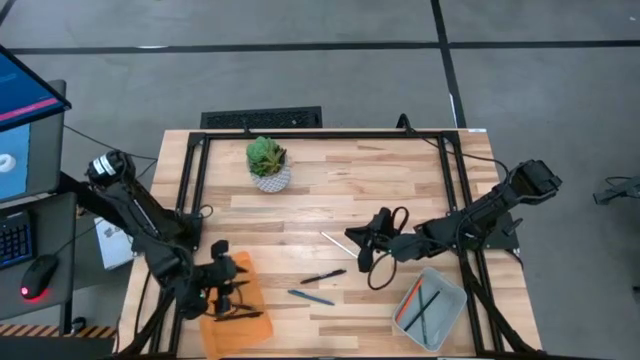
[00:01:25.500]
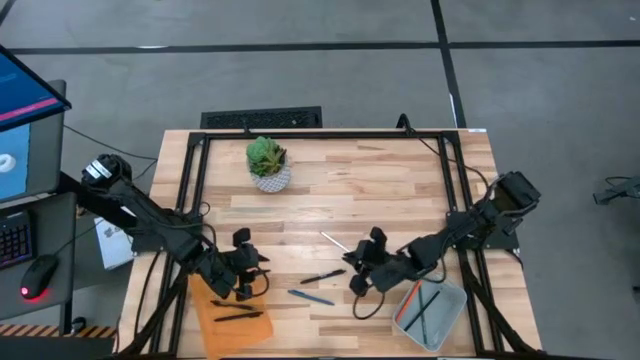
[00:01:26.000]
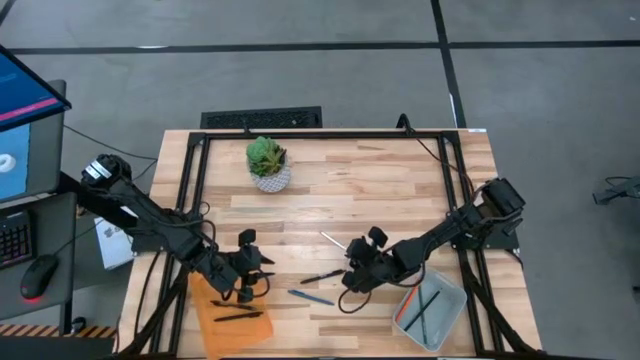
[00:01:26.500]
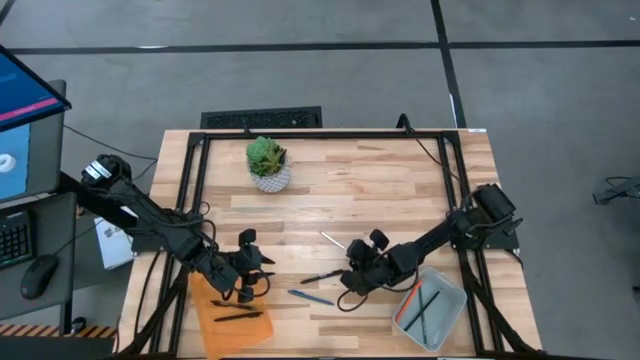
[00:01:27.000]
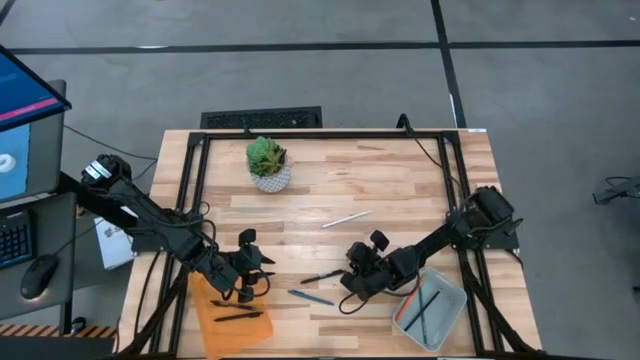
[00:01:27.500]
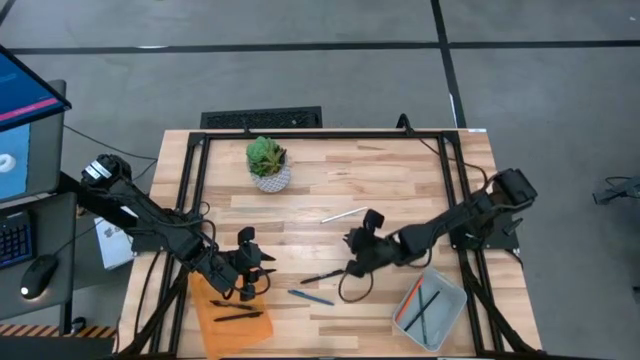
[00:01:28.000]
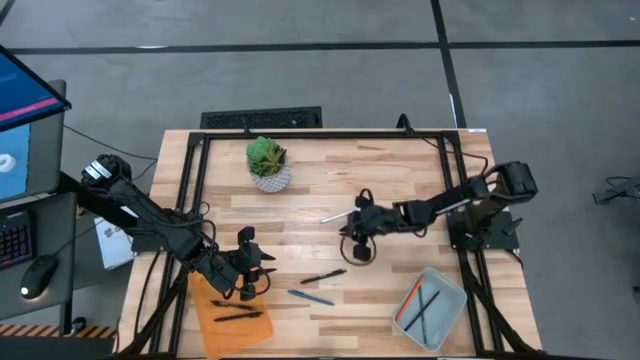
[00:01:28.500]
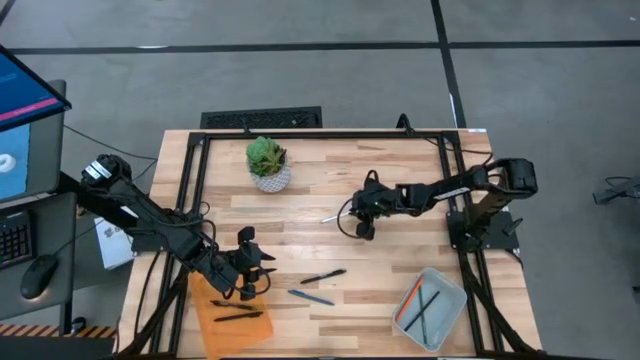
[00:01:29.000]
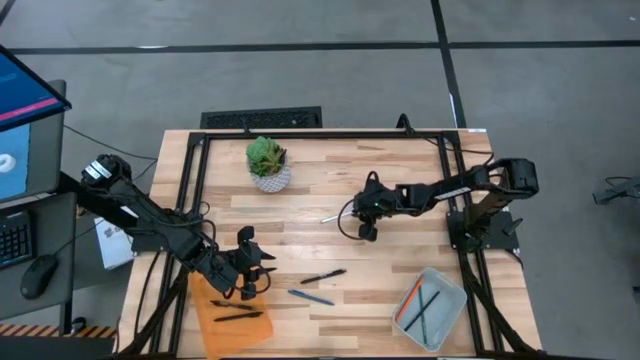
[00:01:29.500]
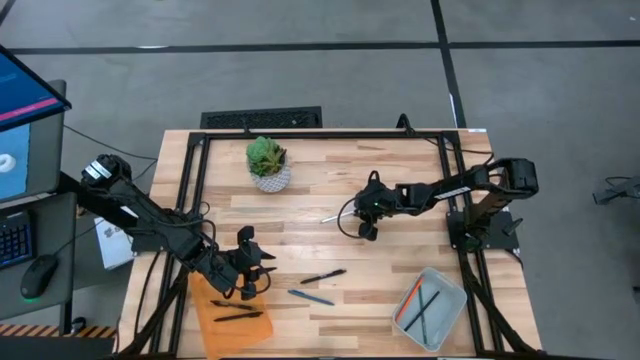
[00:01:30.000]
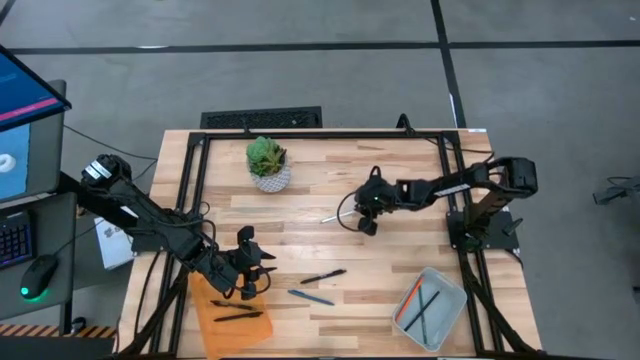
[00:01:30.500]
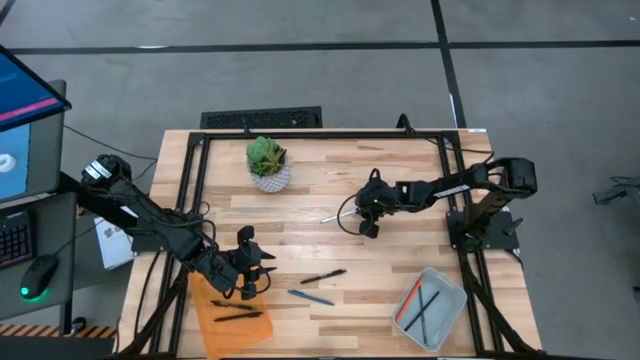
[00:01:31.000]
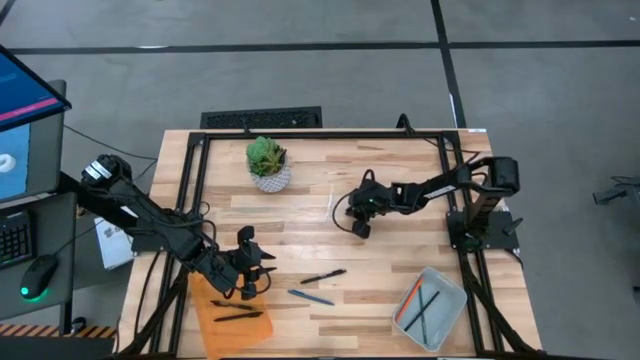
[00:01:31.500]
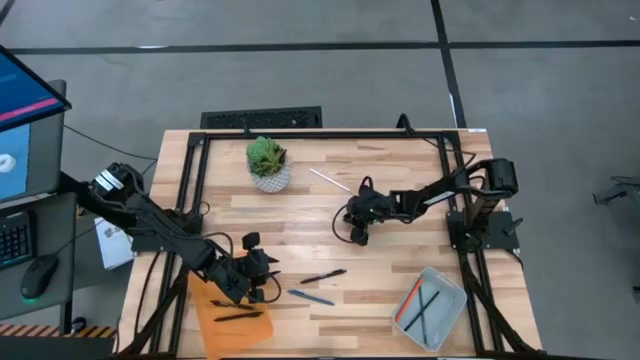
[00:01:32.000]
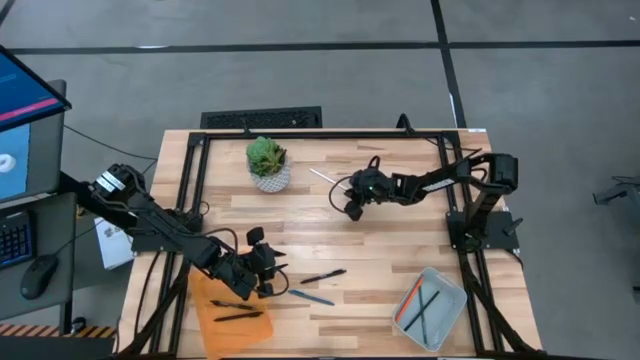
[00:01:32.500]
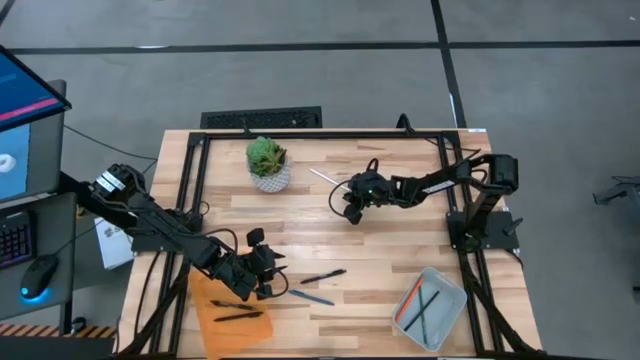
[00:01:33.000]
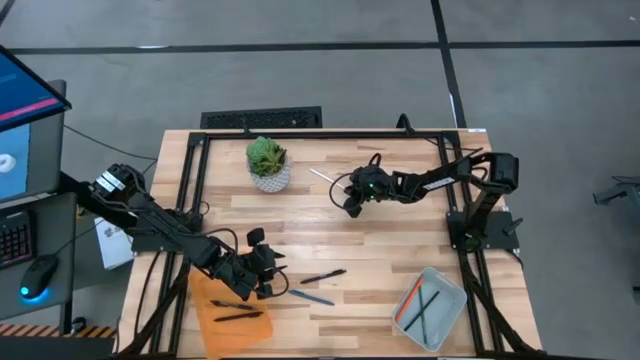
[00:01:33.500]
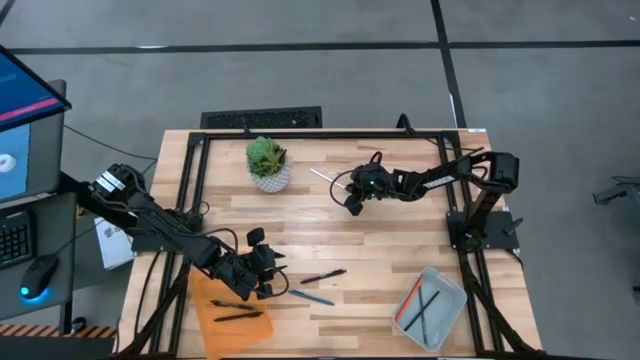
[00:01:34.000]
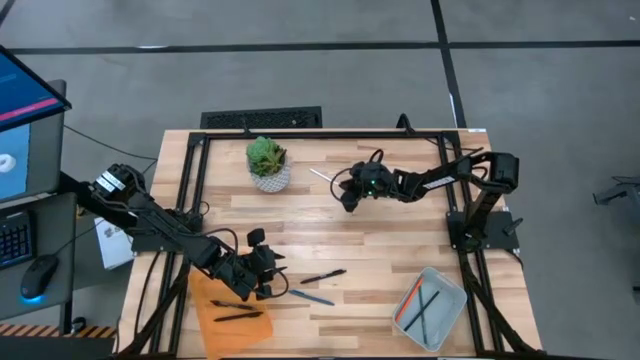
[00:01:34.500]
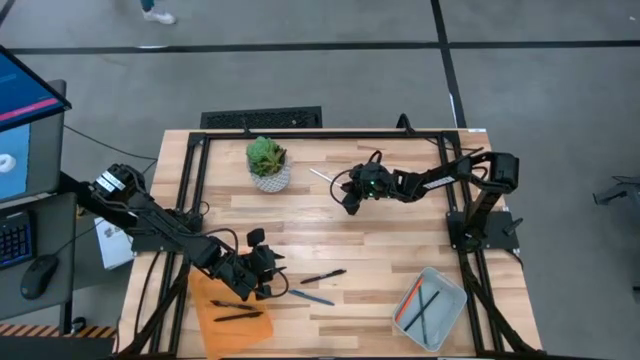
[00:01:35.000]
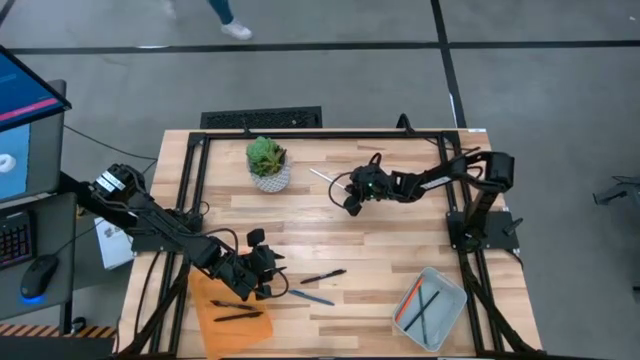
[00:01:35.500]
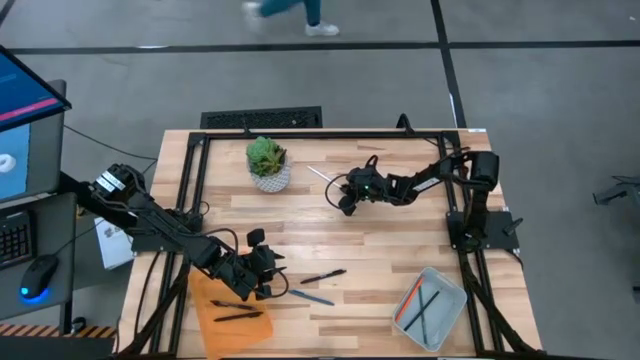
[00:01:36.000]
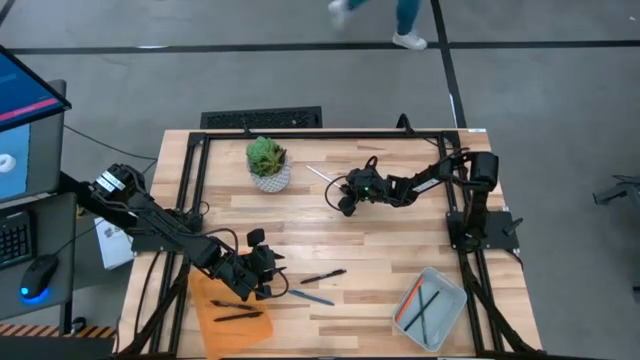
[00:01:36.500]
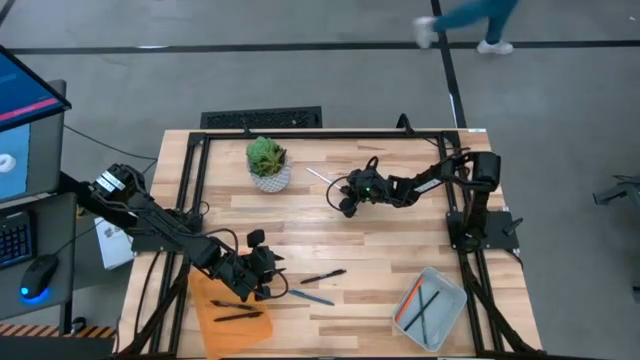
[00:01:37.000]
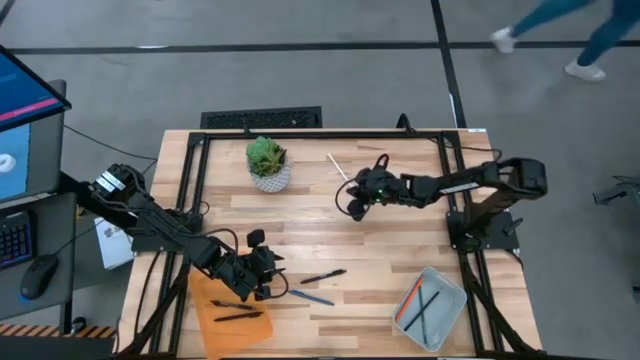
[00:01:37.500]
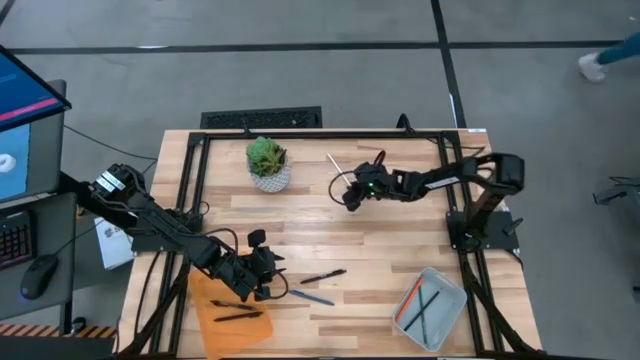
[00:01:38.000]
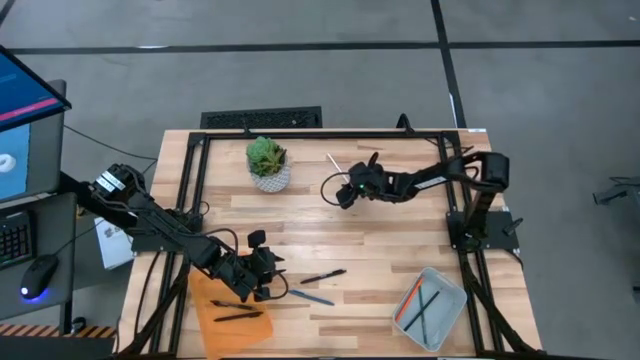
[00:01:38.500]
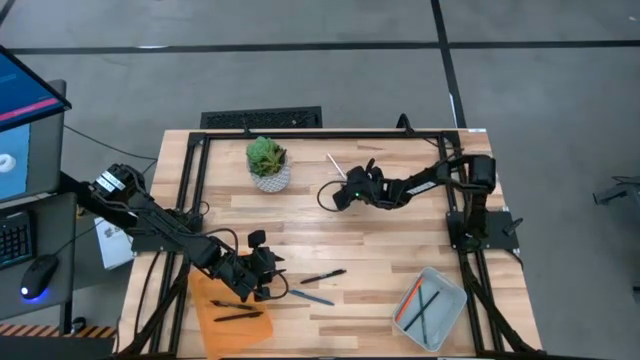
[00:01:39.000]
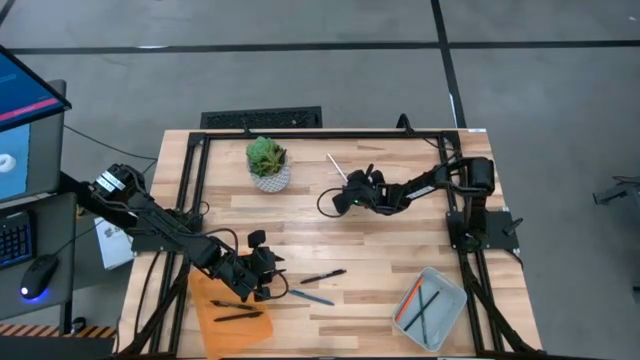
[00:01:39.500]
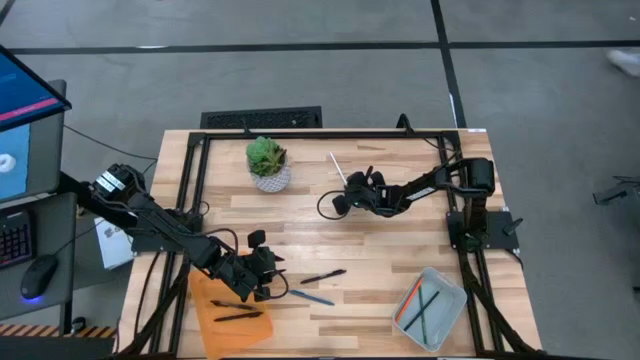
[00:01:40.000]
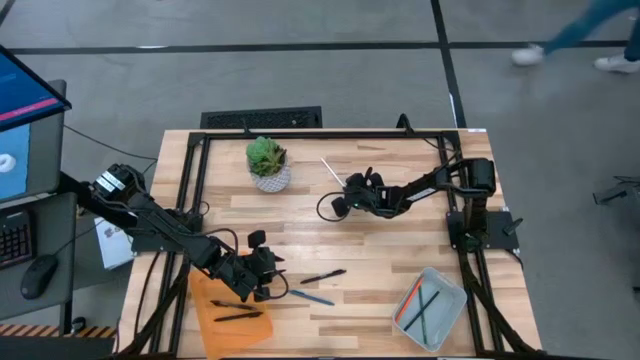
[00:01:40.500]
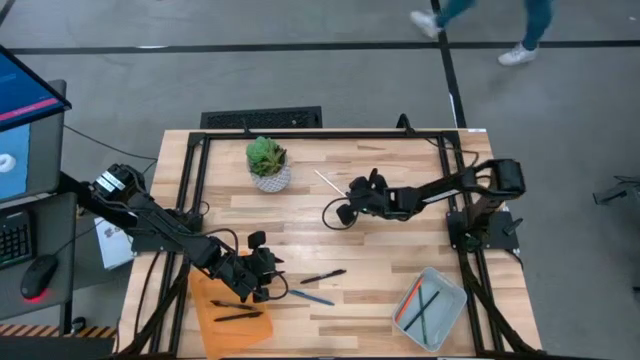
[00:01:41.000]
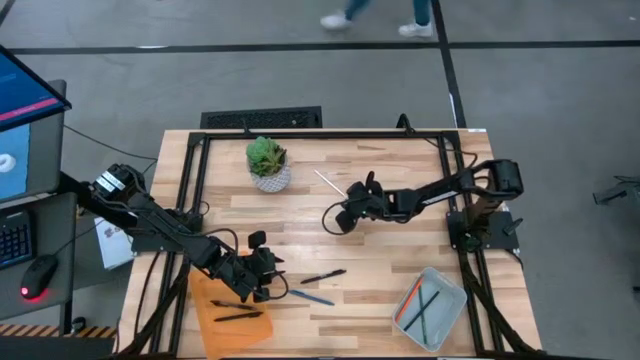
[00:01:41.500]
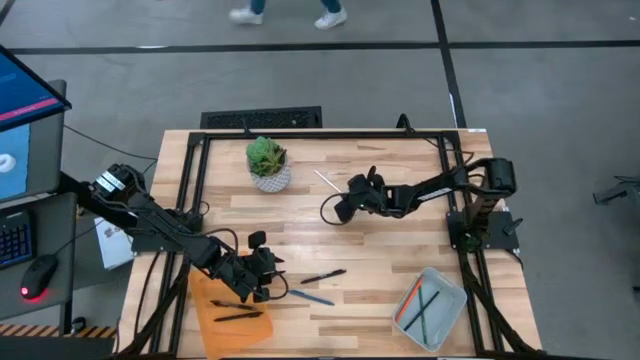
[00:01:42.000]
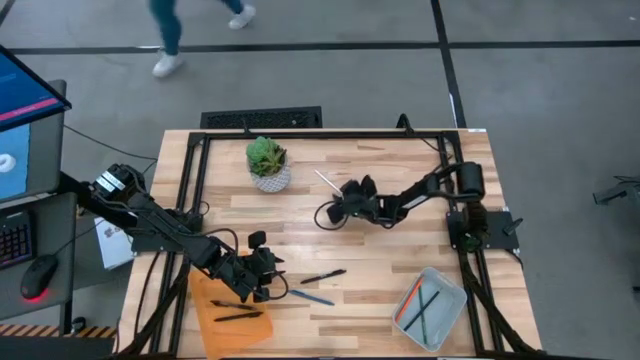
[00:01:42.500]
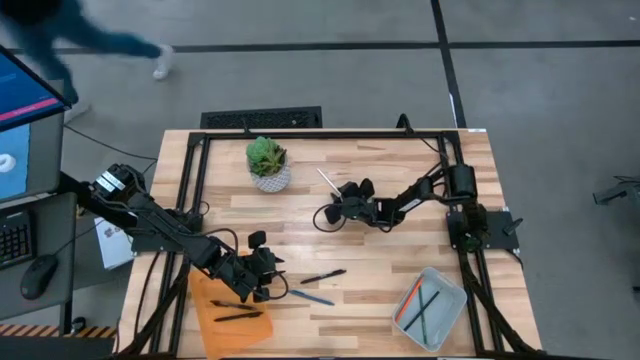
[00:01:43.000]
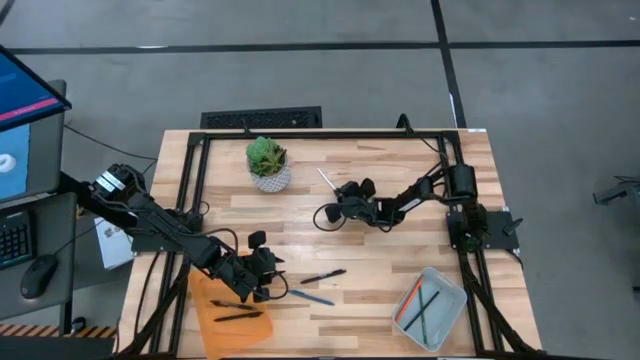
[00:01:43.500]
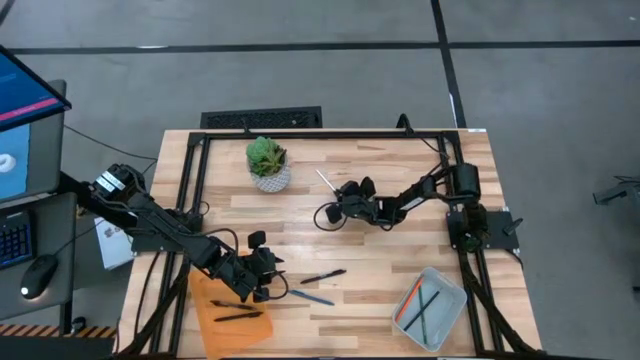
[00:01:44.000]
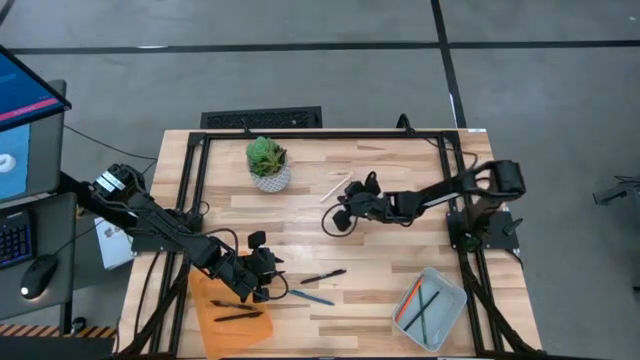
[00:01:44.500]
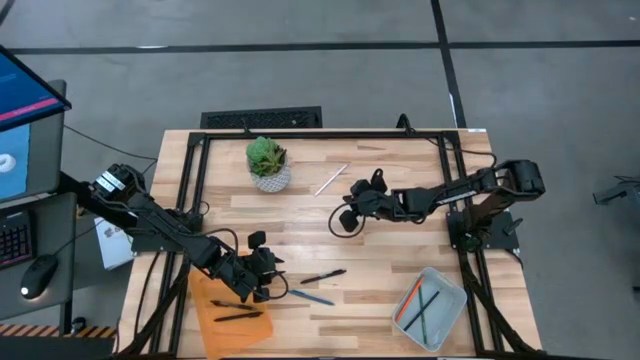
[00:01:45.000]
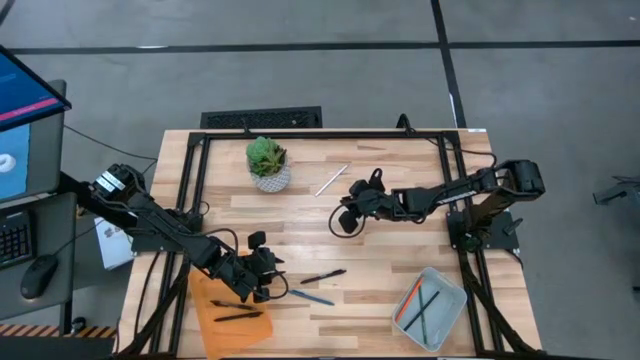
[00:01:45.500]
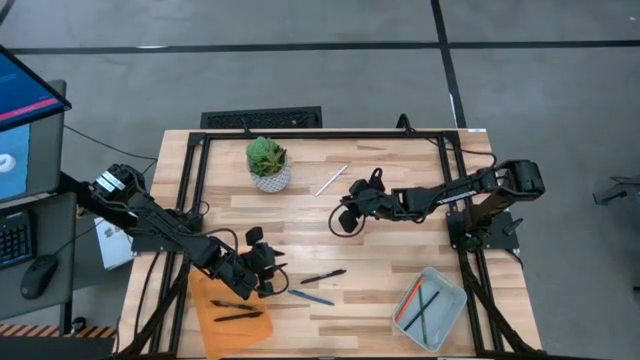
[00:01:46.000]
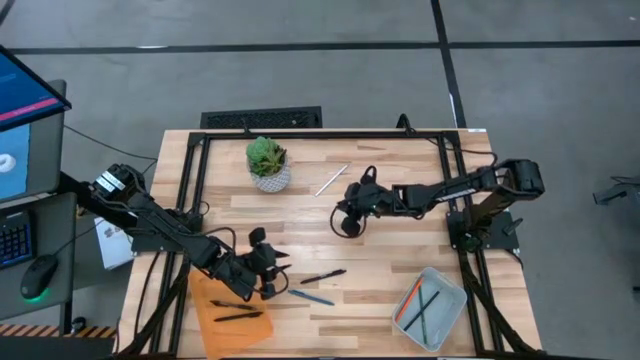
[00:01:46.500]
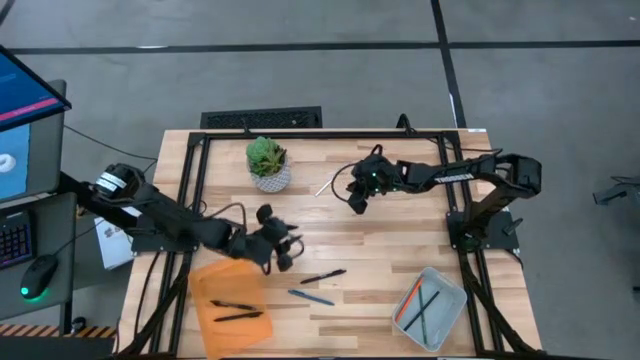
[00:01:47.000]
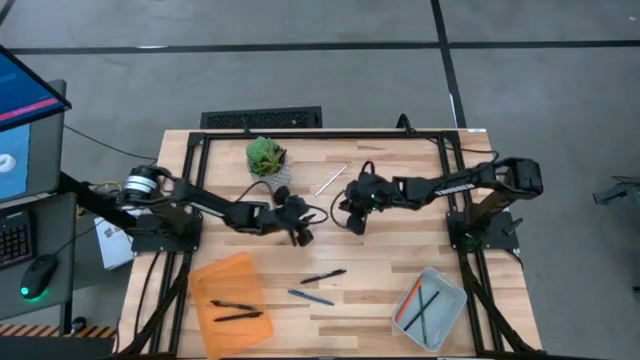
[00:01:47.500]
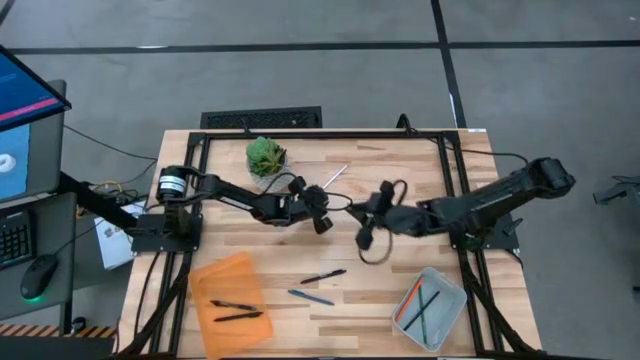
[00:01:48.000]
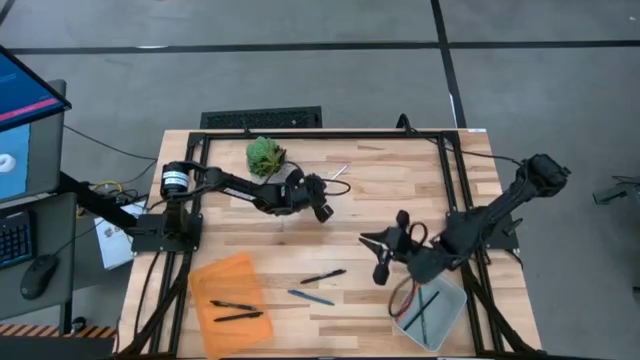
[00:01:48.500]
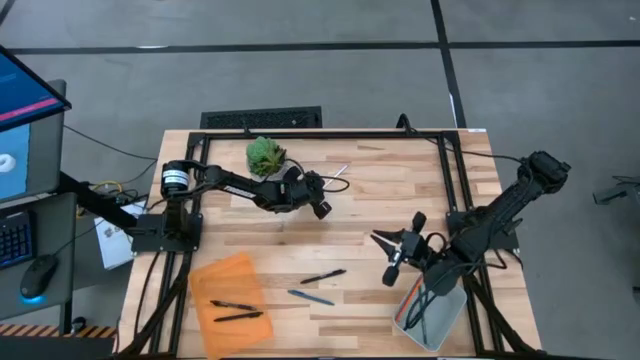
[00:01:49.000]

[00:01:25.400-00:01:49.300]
Task: Sort pens & pencils
Put the white pencil into the gray bin
